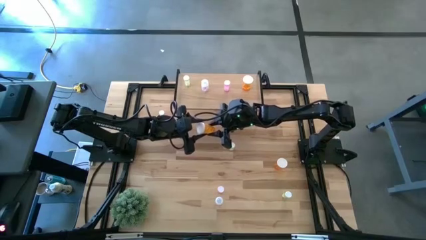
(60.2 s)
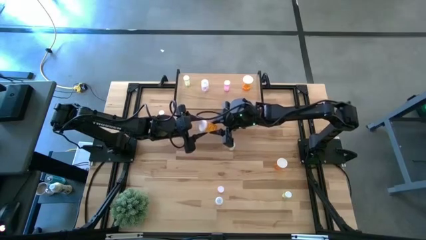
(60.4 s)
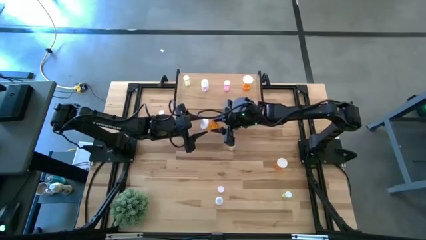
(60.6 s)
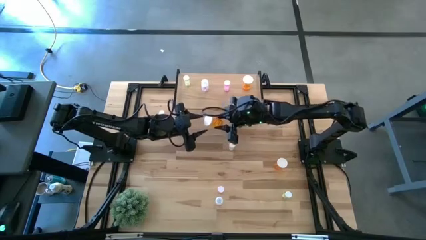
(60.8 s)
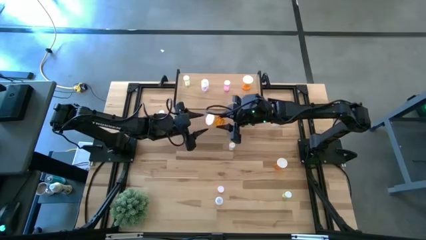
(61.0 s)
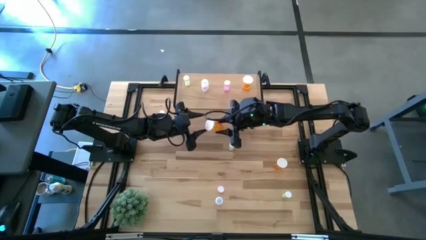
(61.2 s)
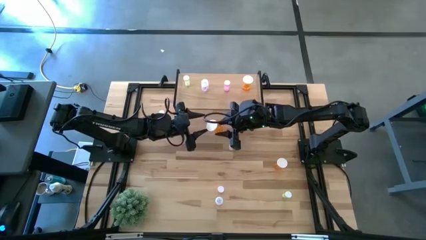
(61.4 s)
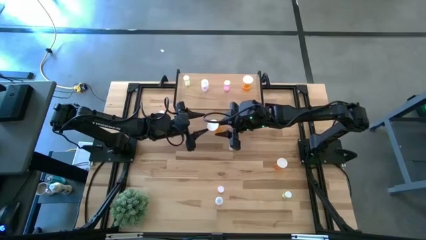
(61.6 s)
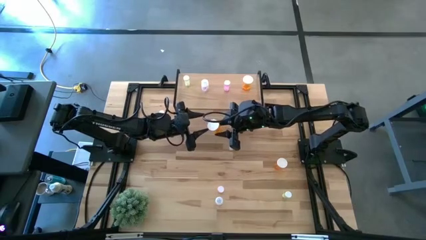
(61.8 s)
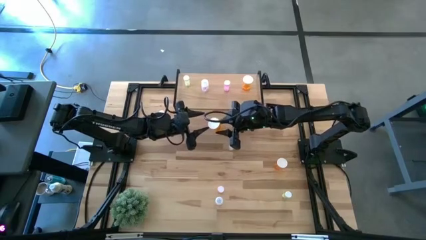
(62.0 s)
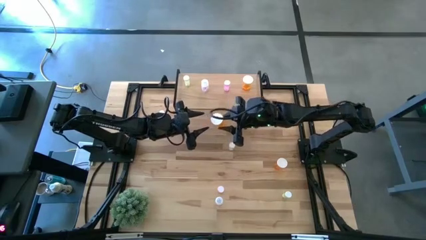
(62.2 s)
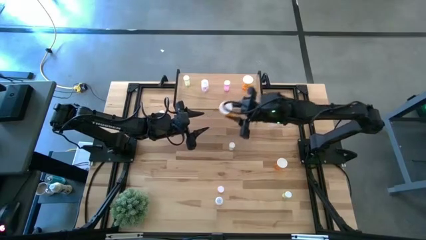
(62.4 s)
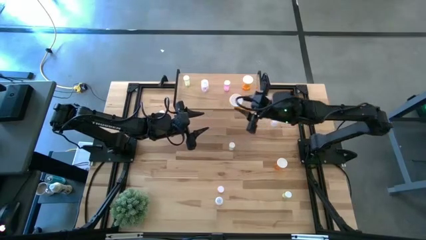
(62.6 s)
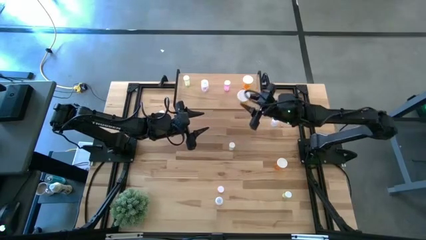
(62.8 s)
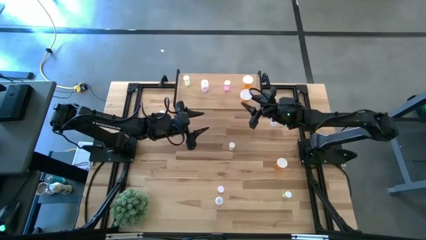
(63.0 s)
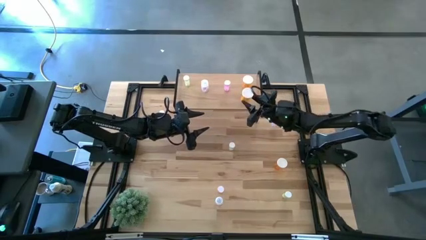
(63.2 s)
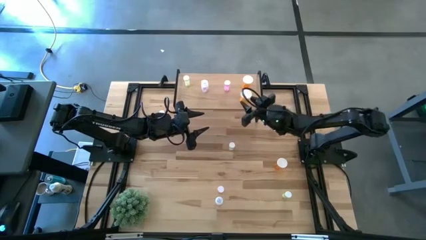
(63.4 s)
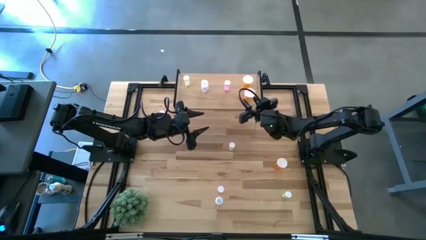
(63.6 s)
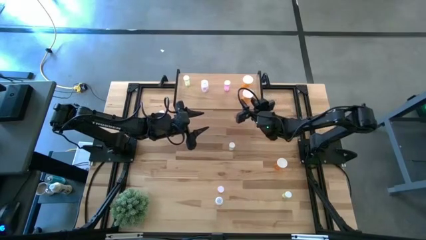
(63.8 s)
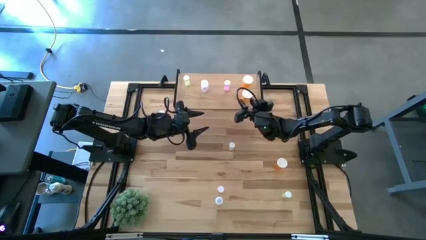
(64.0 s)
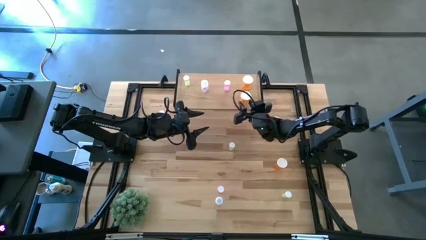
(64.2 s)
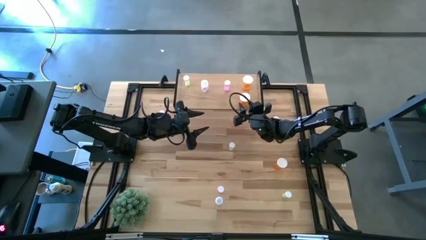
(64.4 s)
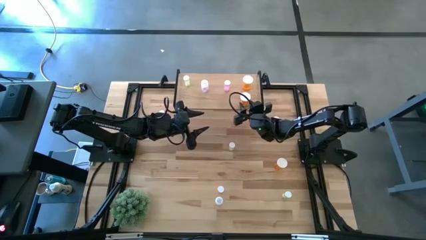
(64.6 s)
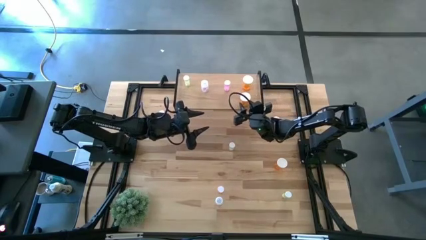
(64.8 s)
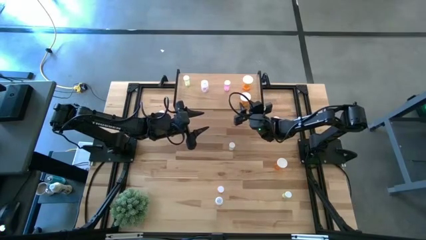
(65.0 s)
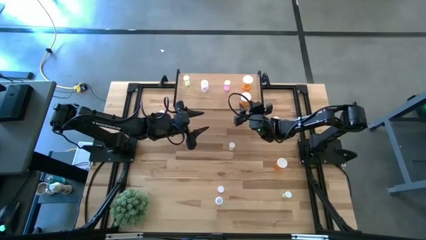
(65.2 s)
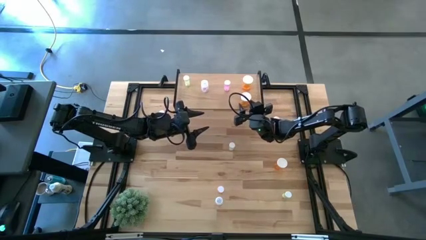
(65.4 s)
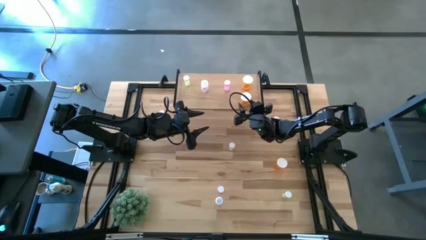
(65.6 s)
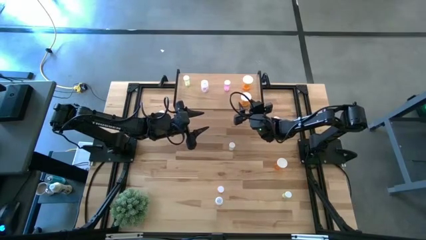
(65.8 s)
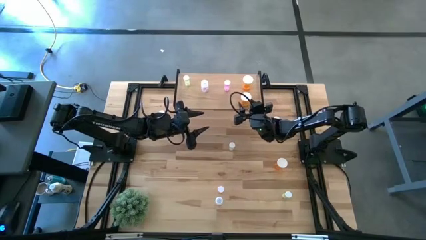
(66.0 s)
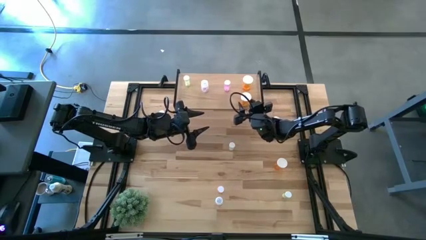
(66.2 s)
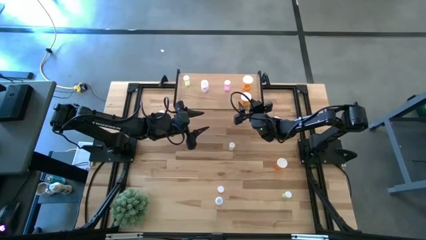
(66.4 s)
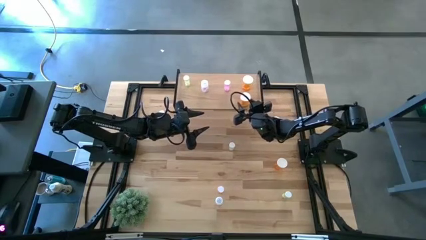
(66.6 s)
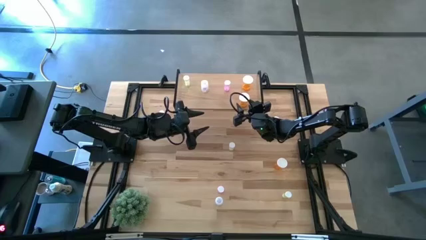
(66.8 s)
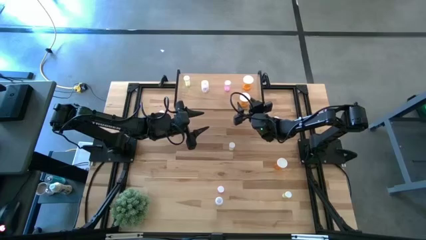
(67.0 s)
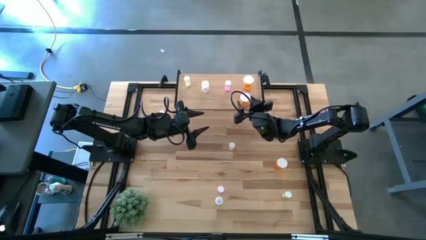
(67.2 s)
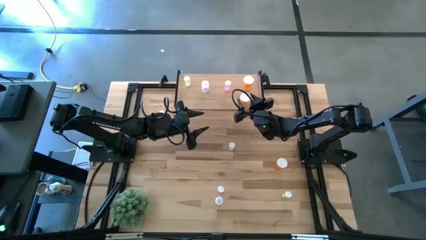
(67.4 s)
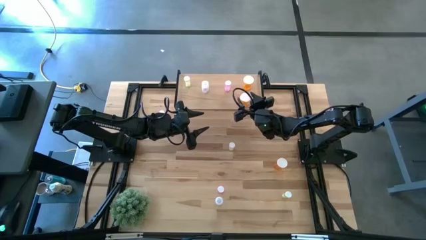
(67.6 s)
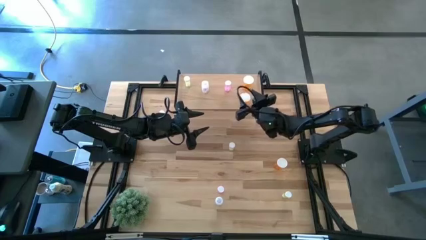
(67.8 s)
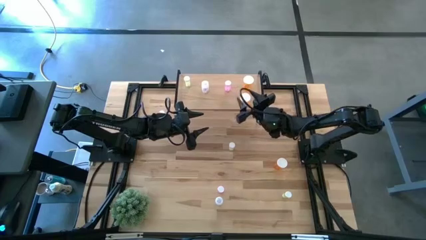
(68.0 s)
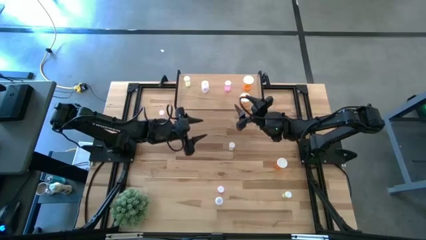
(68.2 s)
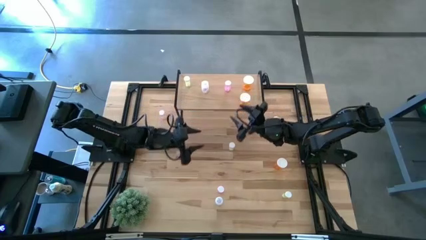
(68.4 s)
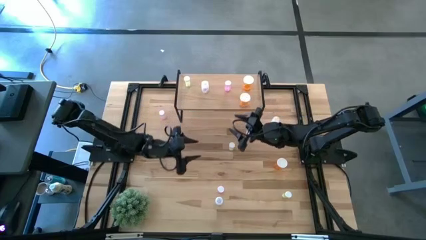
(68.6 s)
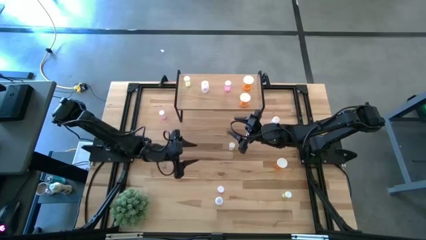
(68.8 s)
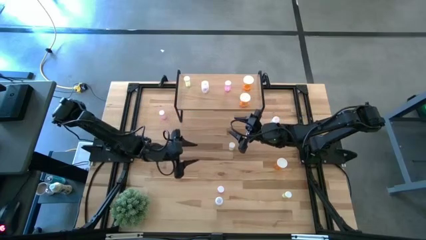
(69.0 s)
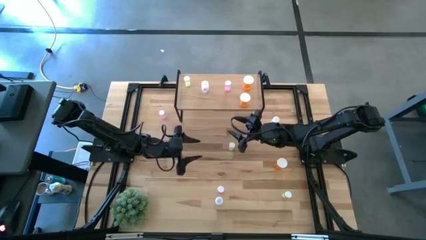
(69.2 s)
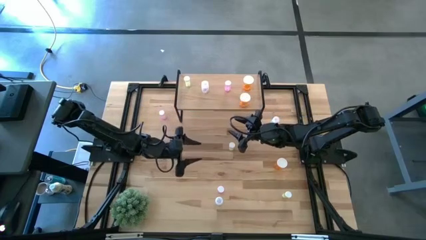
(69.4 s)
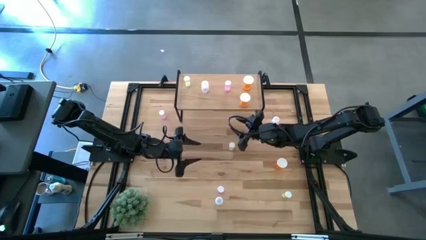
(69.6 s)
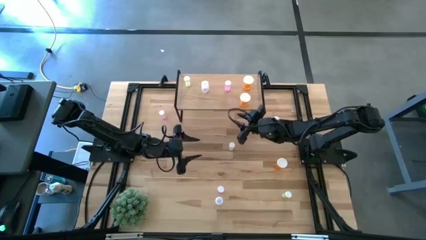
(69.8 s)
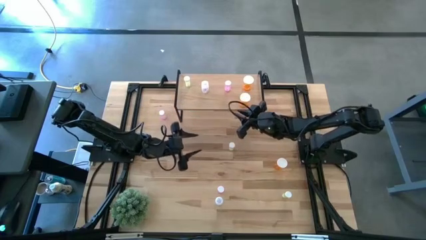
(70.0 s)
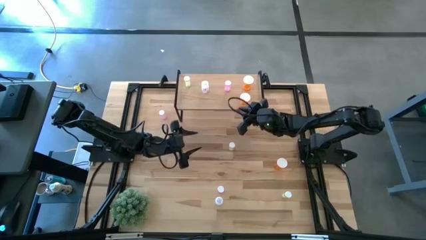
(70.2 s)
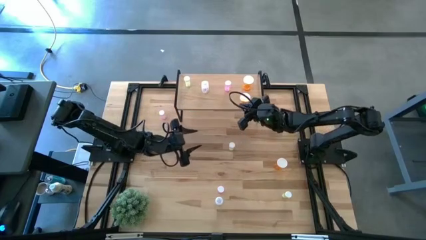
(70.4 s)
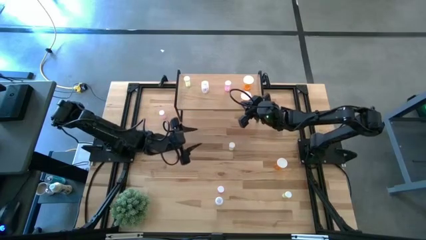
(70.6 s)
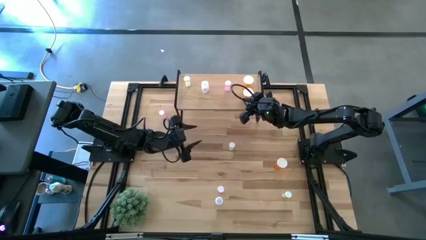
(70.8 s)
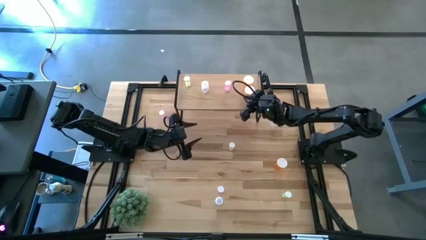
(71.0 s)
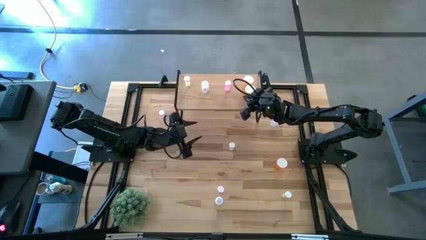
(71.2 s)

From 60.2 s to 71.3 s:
Task: Pick and place medicine bottles onto shelf by color
Put the left orange pill bottle aligned with the other orange pill bottle on the shelf

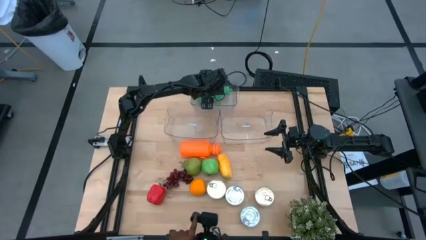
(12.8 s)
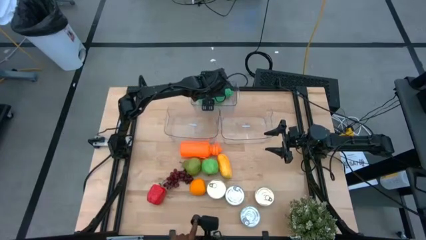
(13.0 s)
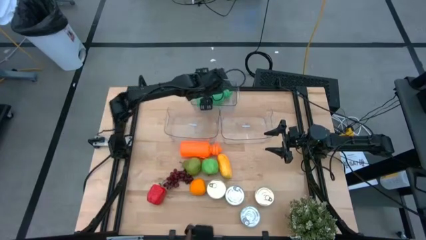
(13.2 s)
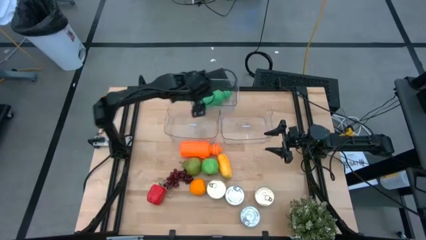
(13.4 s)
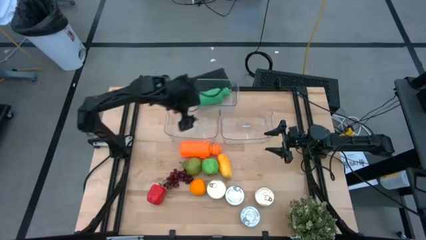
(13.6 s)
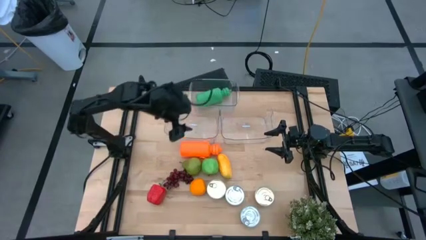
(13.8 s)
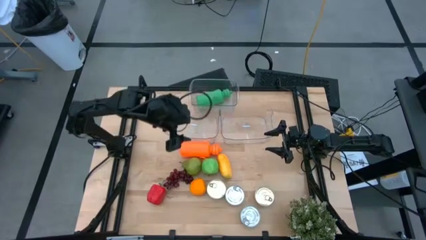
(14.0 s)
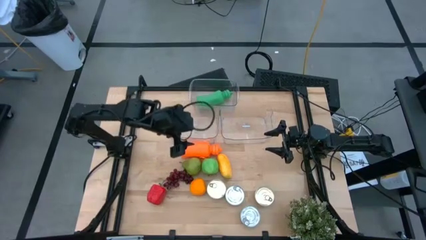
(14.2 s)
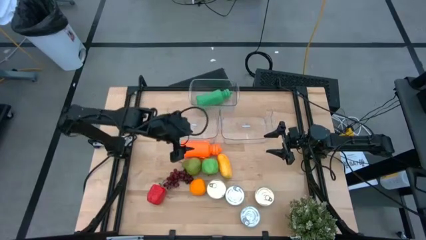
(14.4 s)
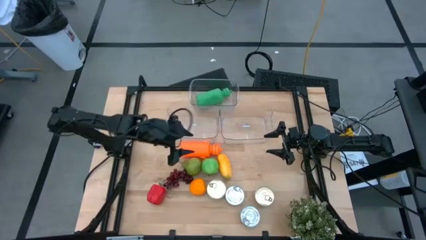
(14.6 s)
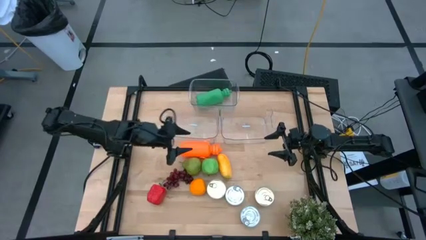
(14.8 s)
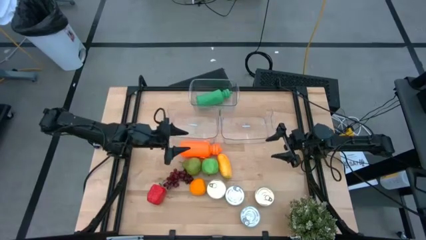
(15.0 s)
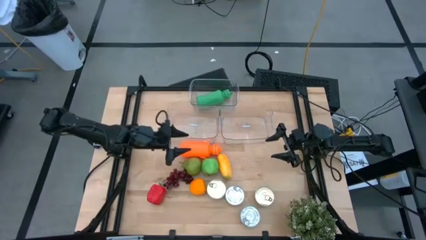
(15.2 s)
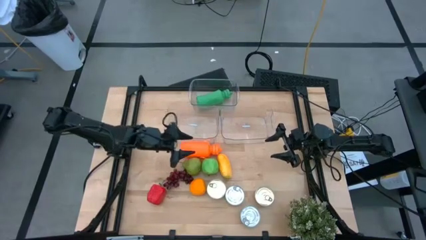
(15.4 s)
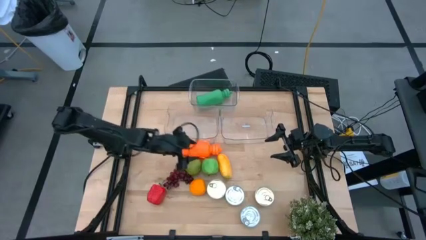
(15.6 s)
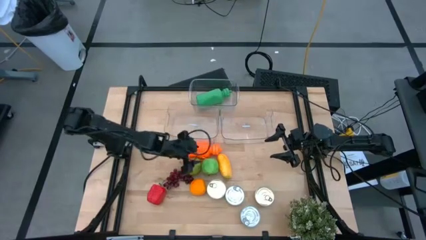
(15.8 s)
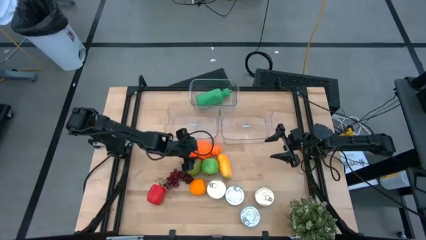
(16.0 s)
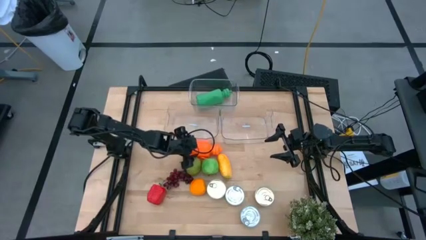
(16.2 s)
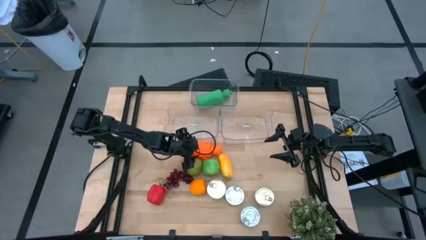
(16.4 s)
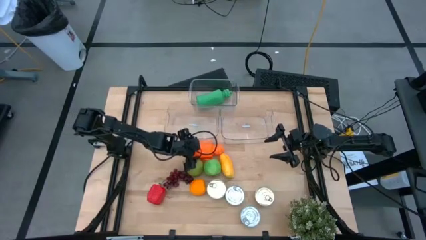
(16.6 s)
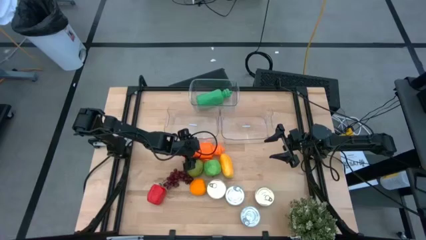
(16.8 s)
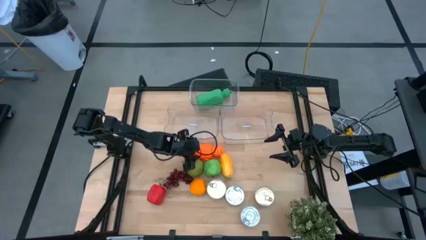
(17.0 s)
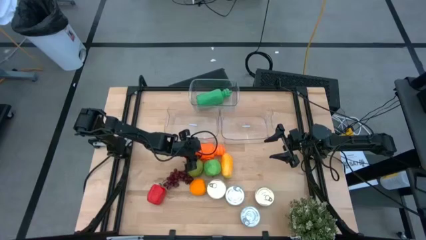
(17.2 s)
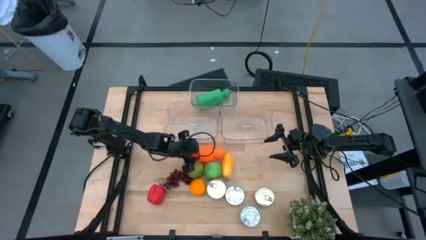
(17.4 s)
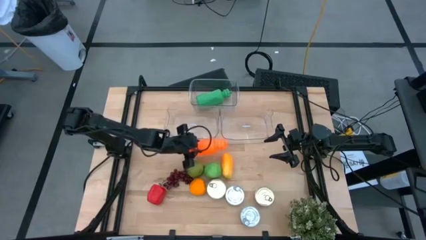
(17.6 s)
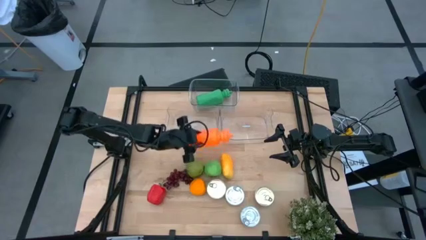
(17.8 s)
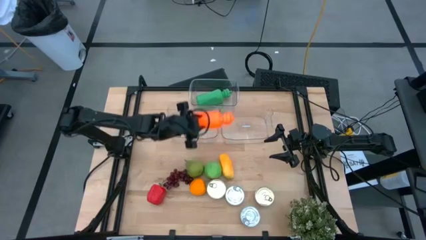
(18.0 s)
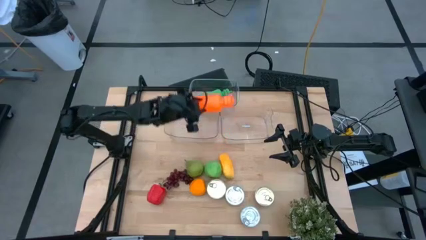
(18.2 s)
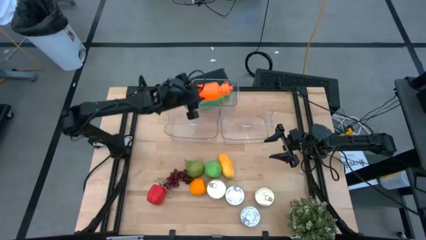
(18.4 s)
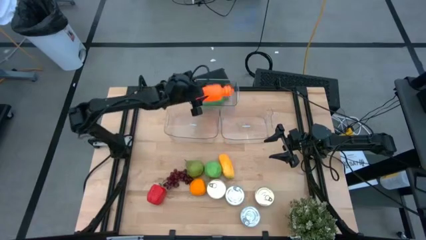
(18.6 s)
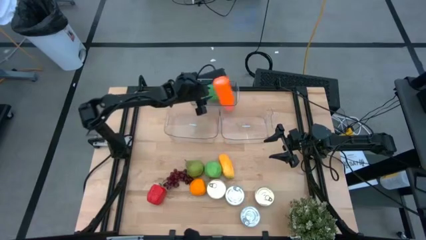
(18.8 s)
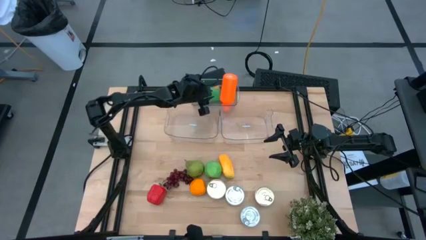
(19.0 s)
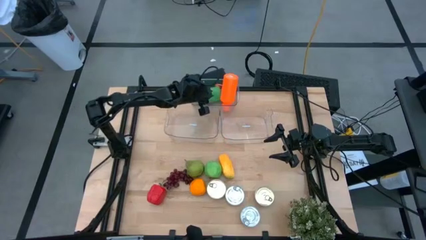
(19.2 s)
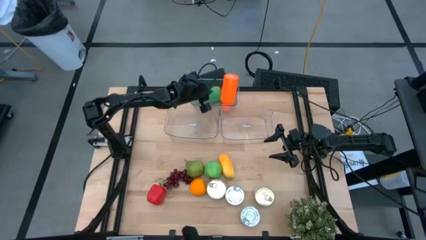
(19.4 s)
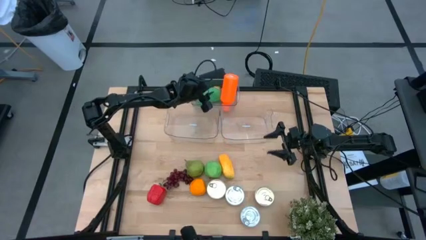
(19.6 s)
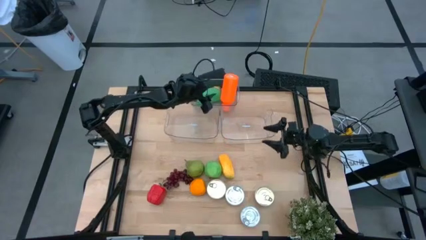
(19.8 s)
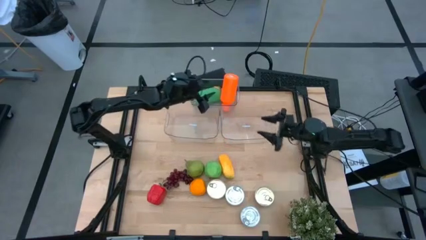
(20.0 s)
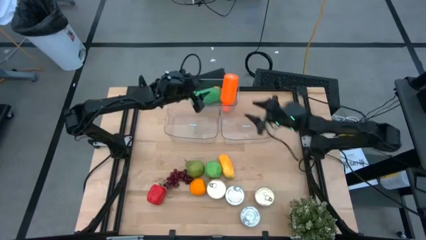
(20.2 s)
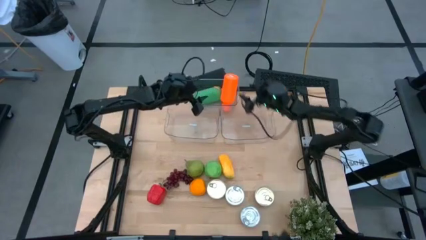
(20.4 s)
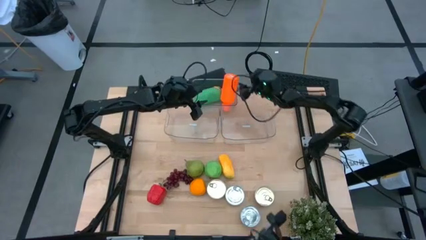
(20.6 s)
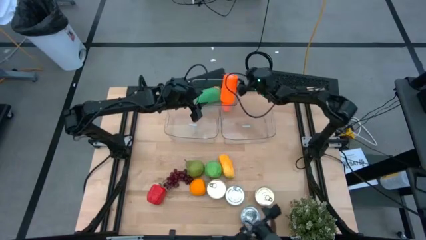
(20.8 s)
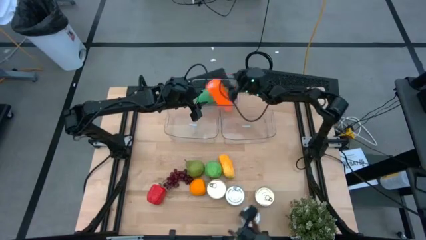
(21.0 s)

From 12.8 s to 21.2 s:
Task: Pick & Place Food Item
Put the orange water bottle into the top transparent bin
